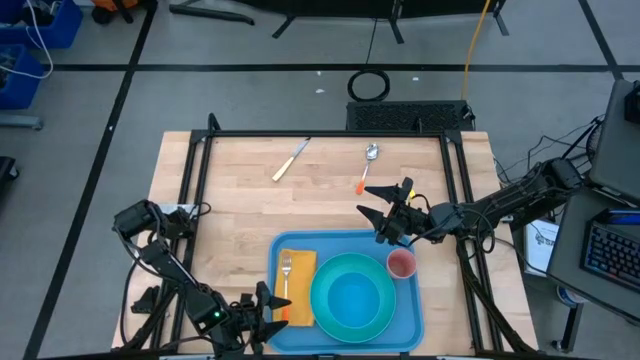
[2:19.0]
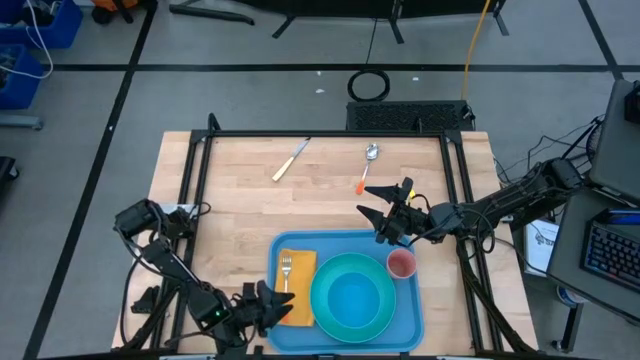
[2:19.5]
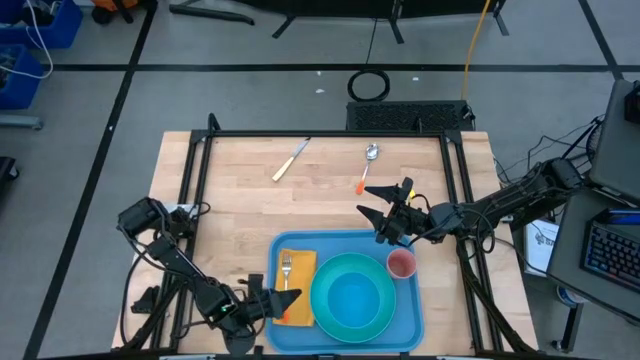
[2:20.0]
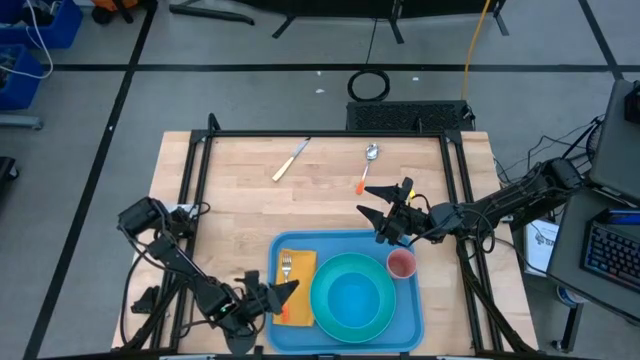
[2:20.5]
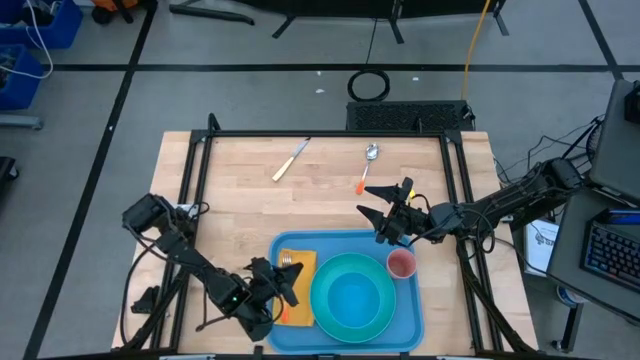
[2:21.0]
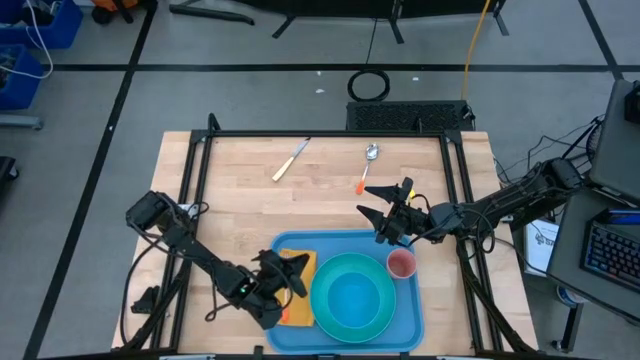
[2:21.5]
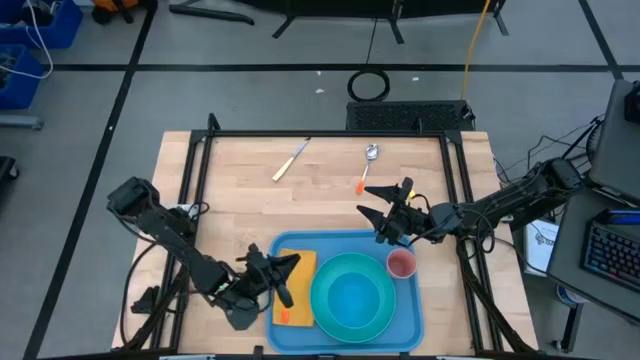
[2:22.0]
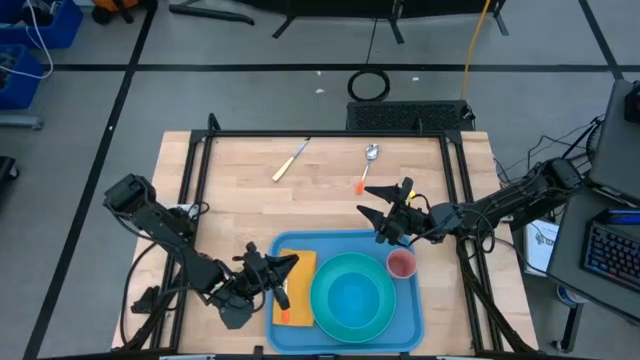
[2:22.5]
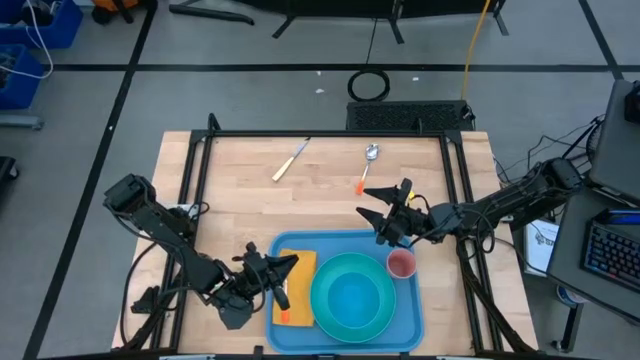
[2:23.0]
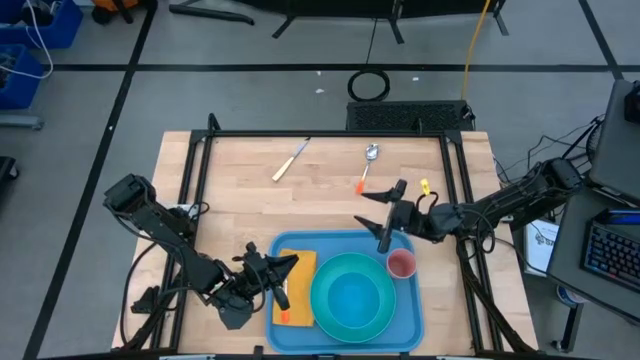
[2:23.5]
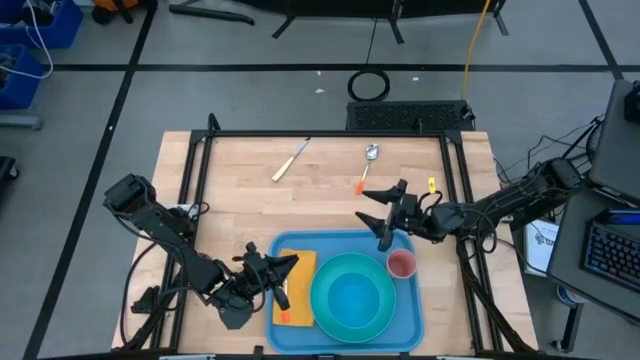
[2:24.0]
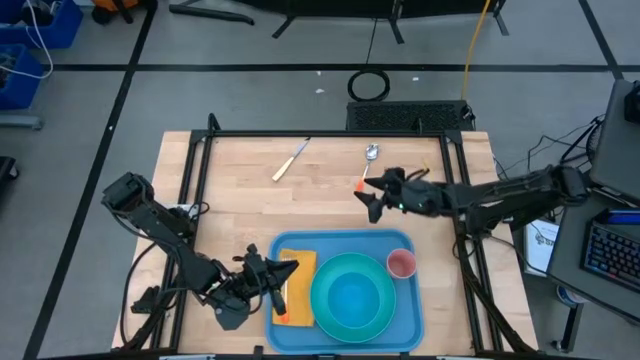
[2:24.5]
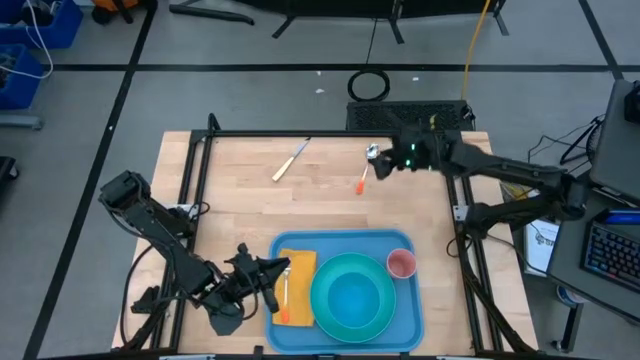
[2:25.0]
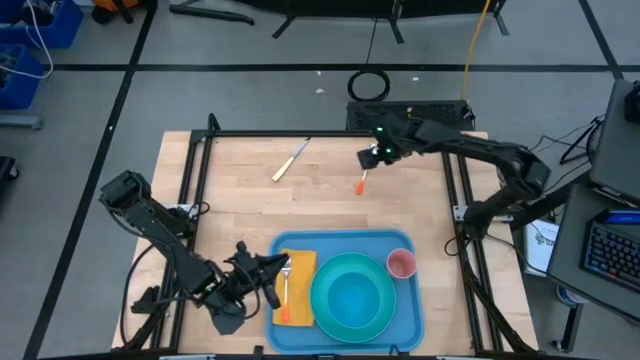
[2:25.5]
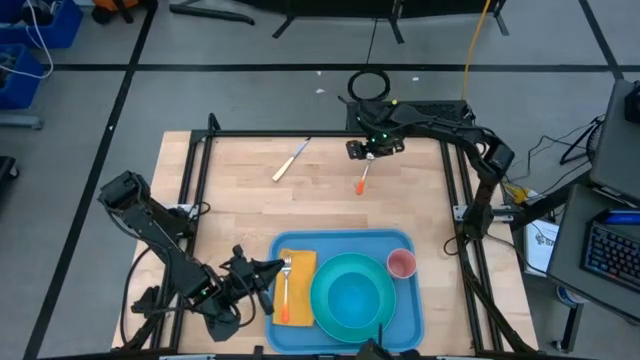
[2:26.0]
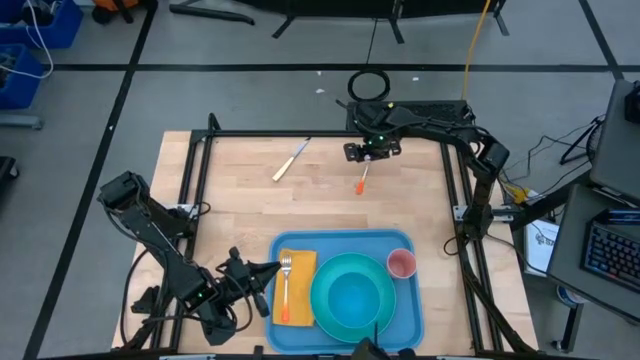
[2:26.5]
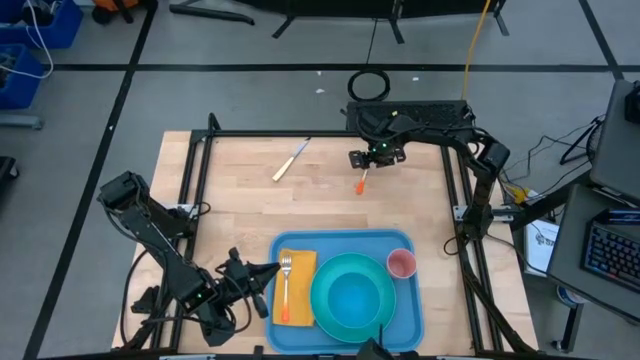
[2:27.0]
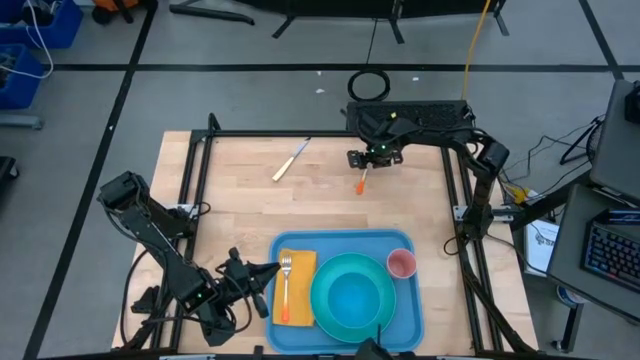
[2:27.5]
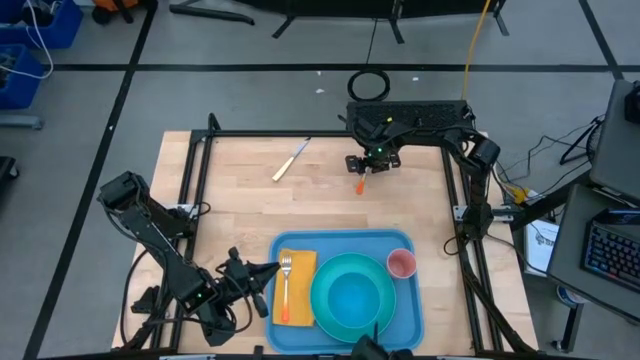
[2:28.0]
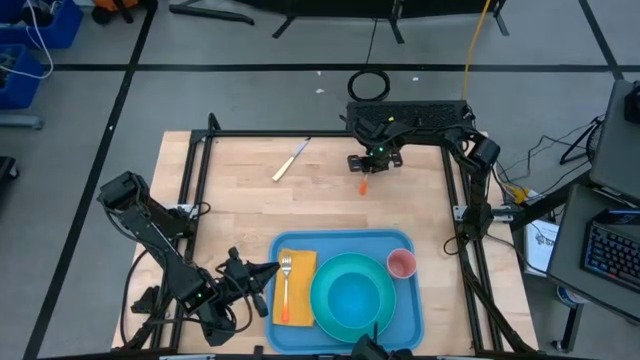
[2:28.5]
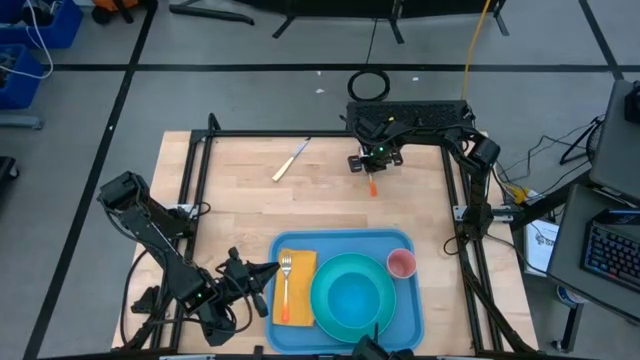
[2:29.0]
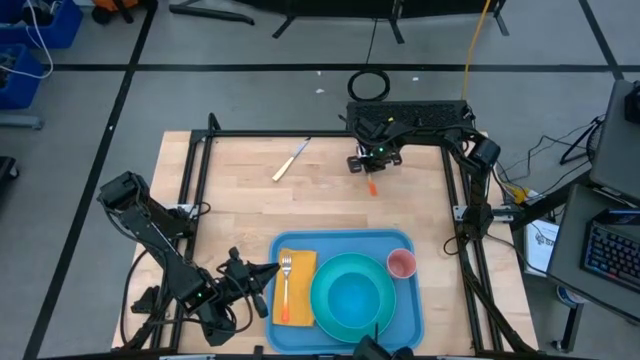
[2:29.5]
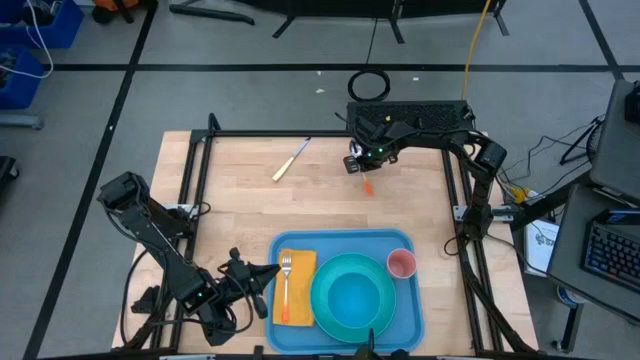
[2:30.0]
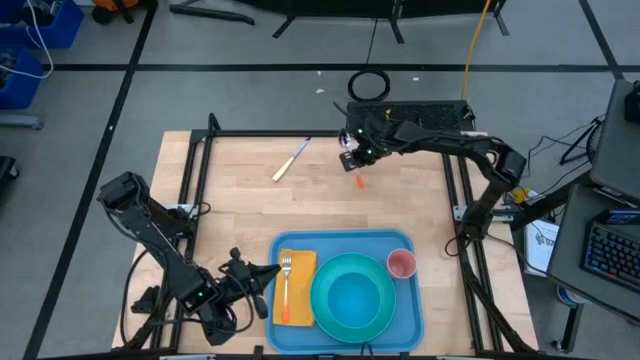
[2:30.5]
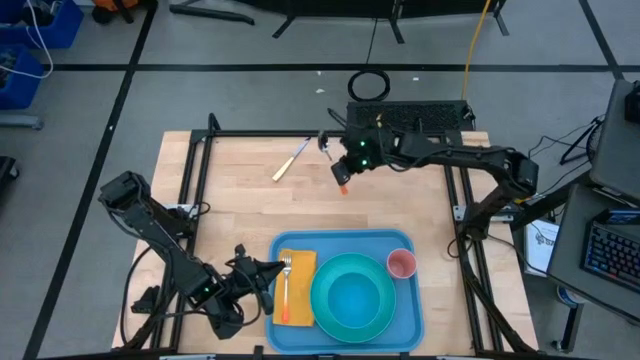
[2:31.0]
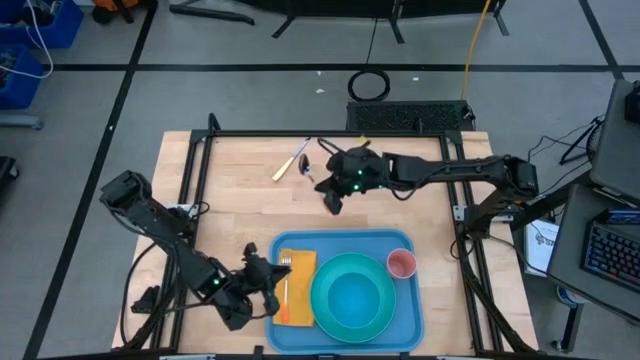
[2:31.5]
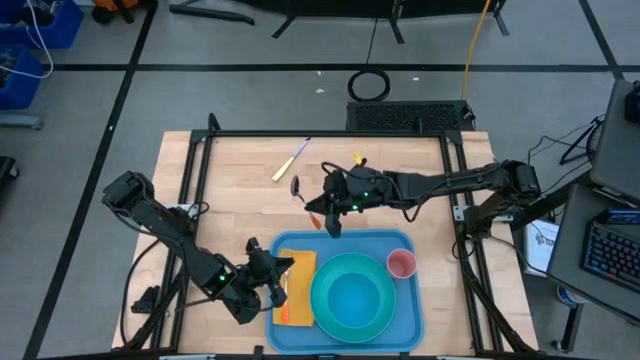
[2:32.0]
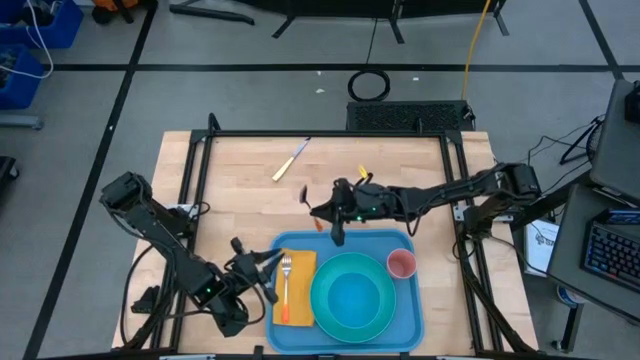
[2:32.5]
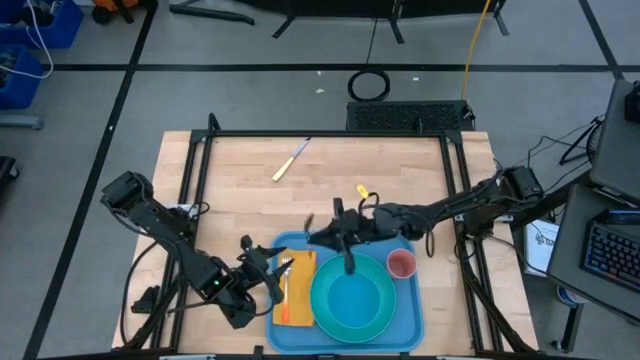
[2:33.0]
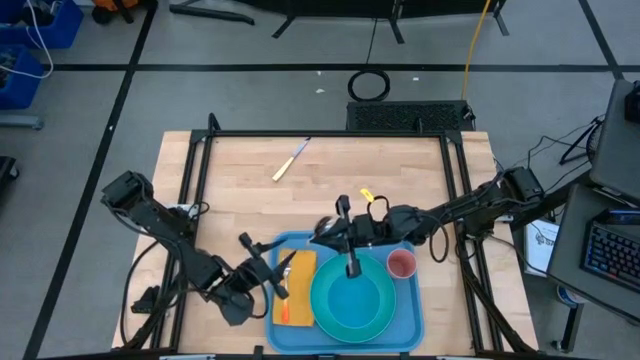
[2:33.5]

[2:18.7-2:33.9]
Task: Set up tray
Put the orange spoon on top of the yellow table napkin to the right of the orange fork

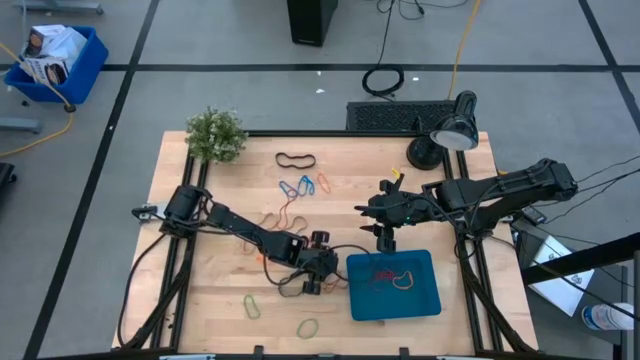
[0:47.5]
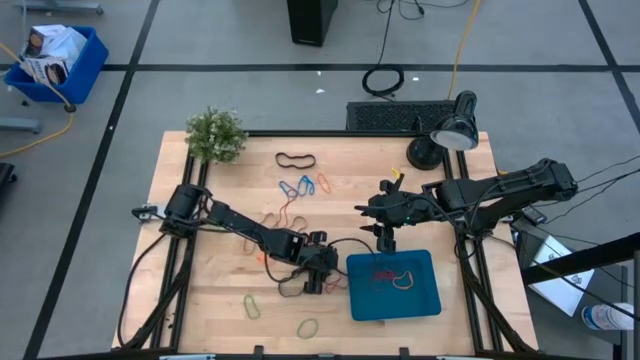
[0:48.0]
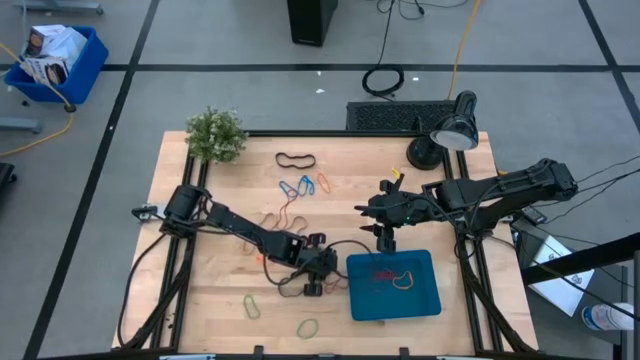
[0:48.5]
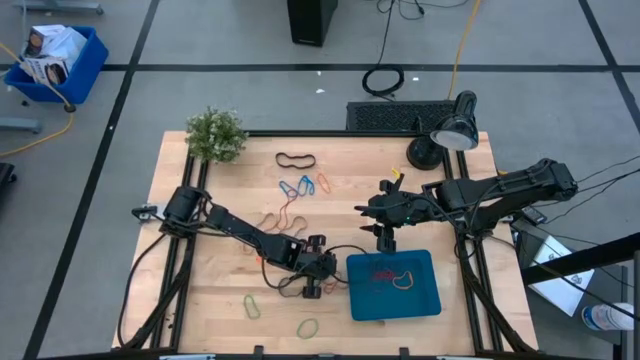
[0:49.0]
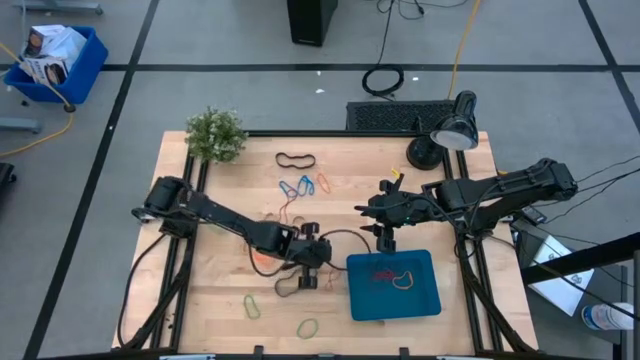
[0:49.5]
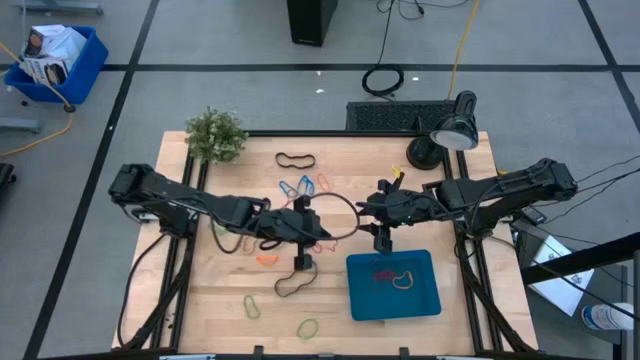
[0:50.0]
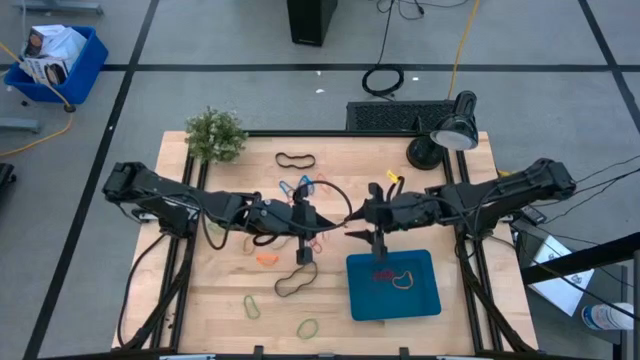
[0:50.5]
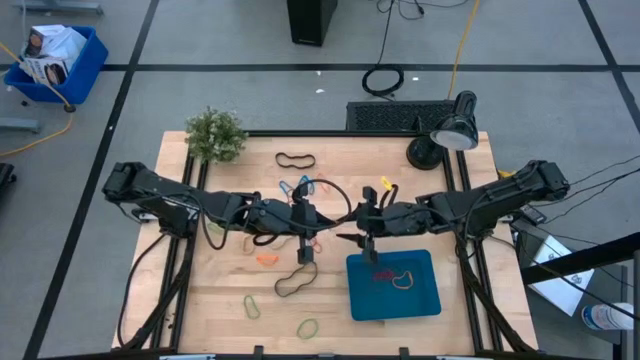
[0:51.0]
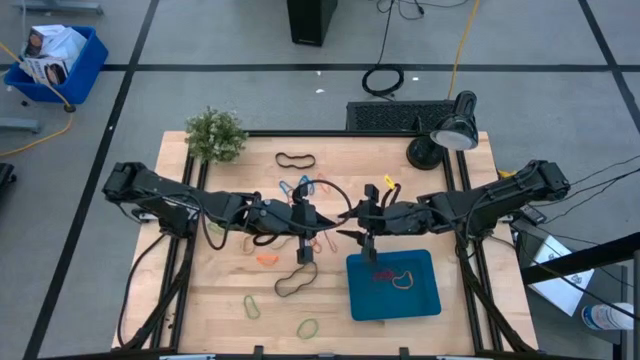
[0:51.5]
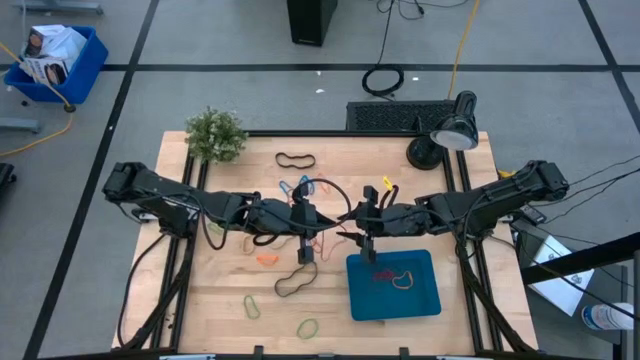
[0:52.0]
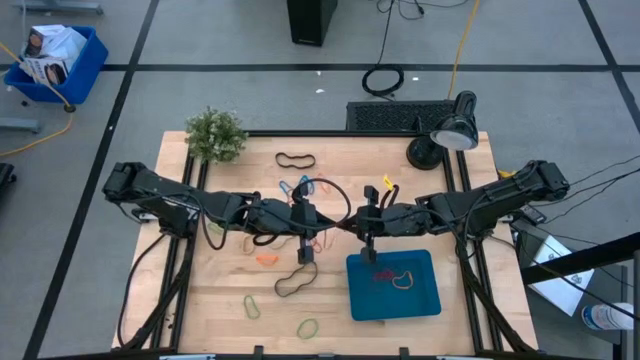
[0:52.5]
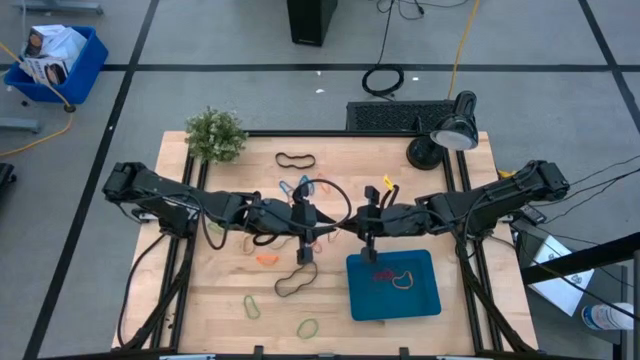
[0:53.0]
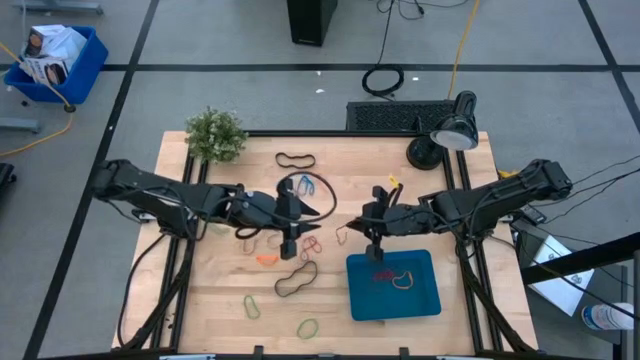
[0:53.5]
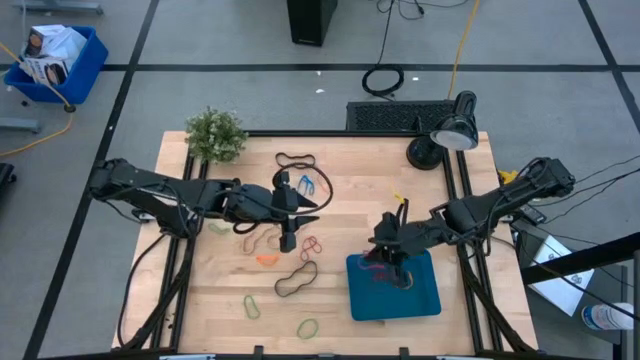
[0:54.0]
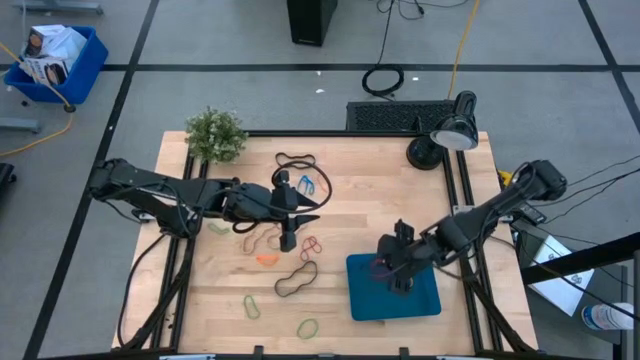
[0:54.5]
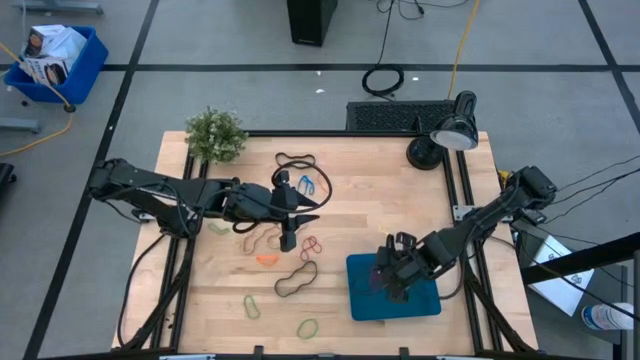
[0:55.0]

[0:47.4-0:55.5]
Task: Pick and place rubber bands into bin
Put the red rubber band into the blue bin
